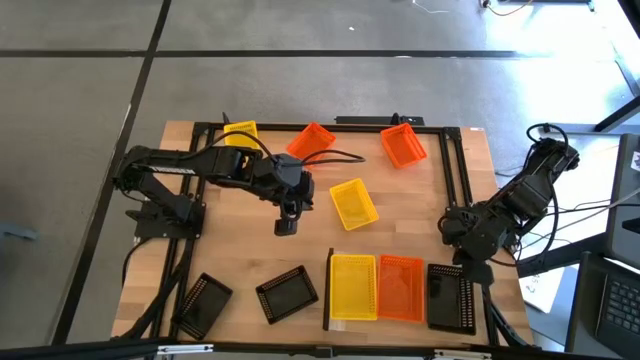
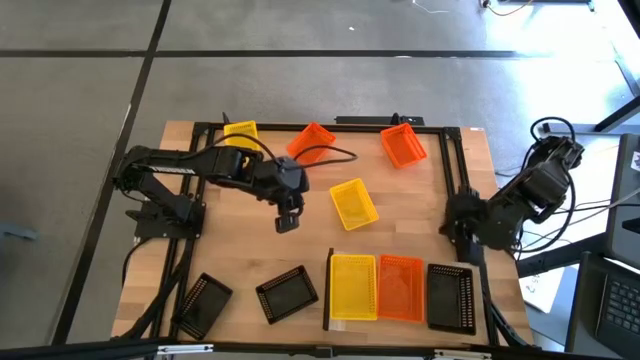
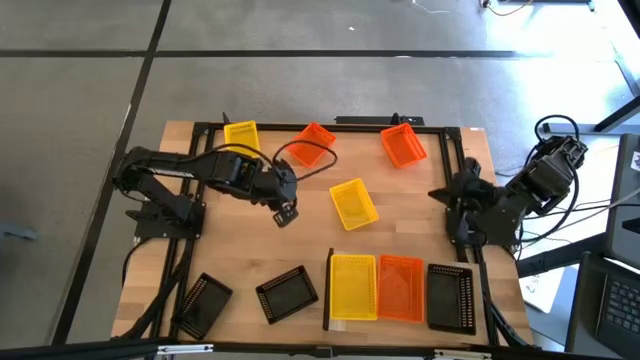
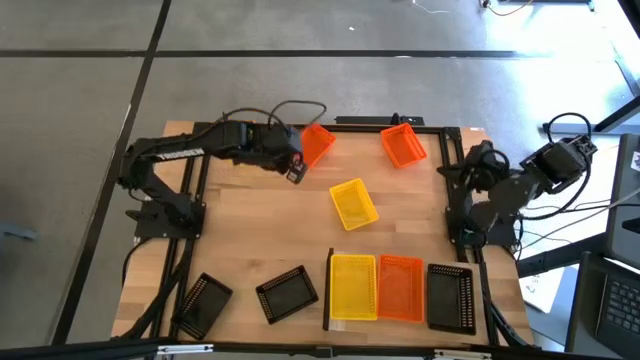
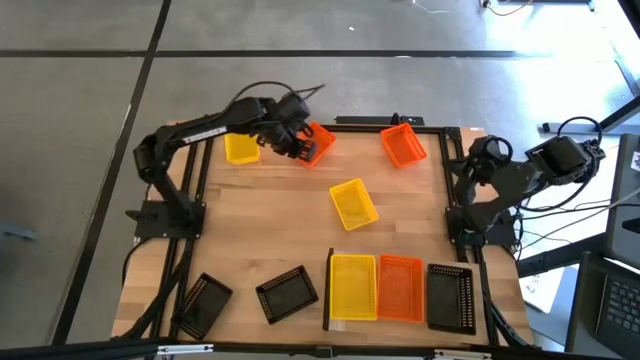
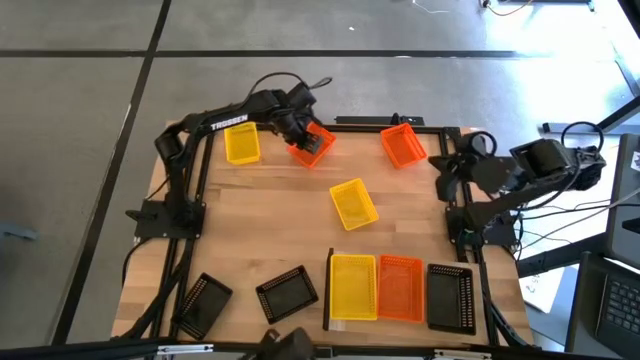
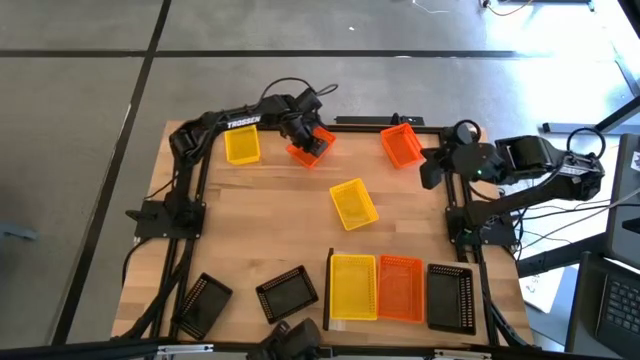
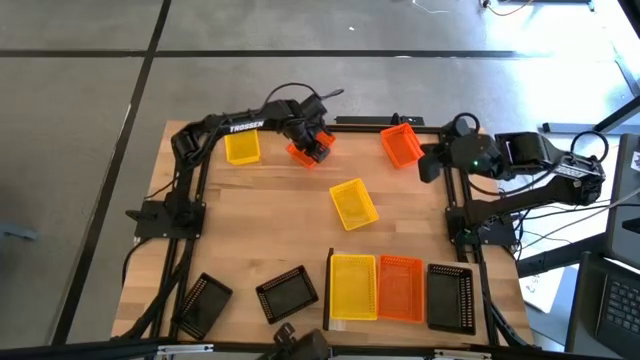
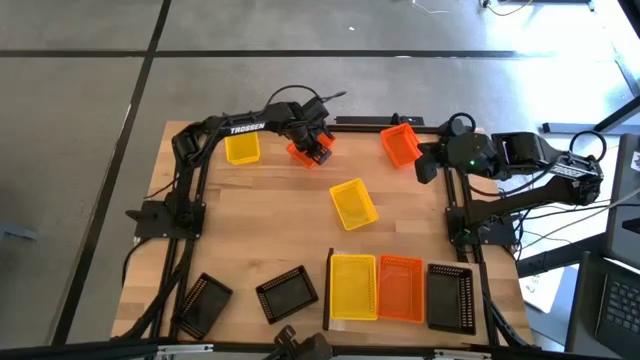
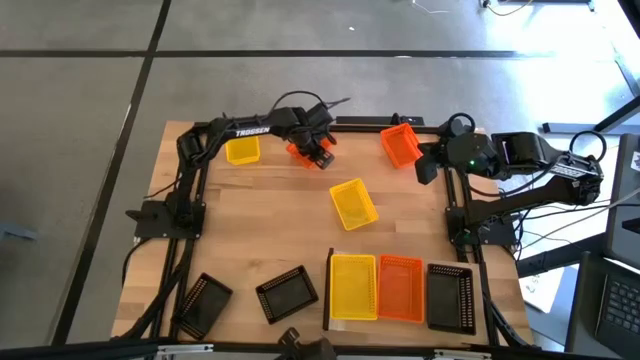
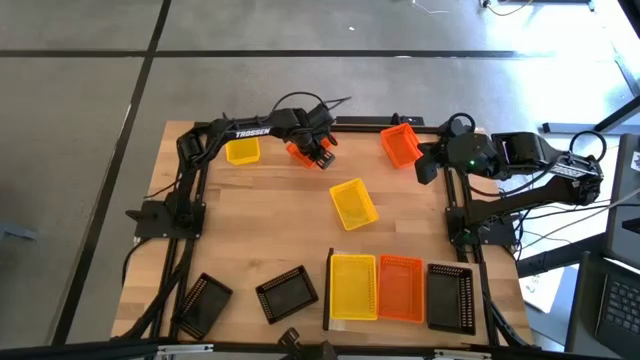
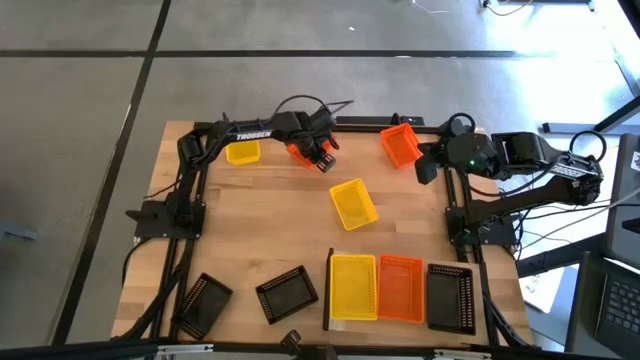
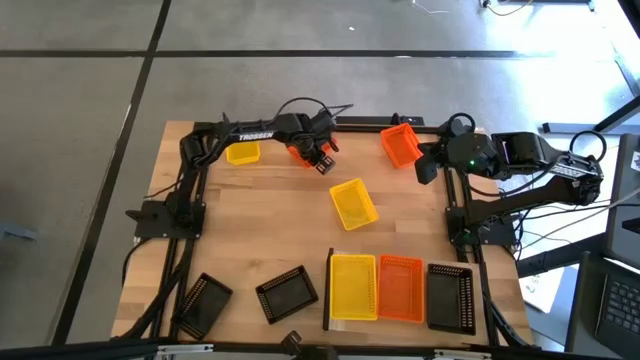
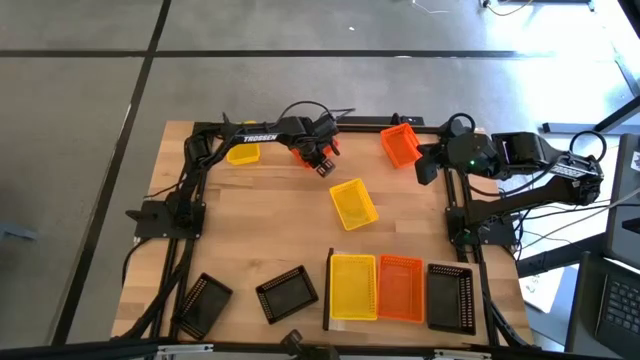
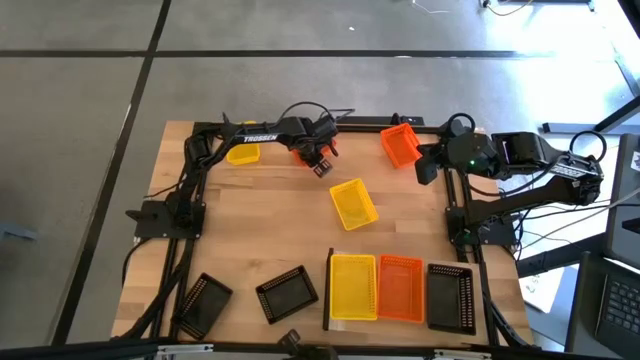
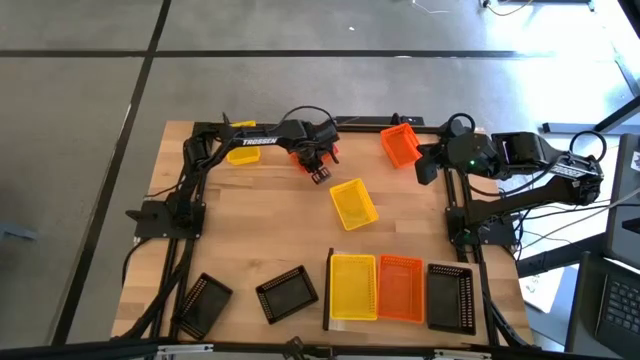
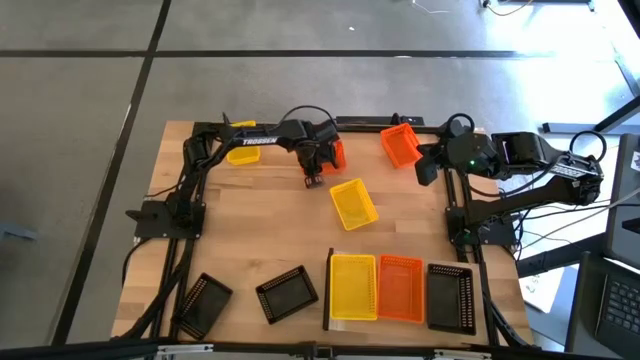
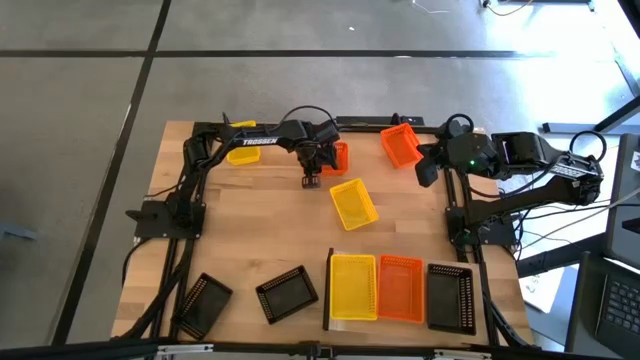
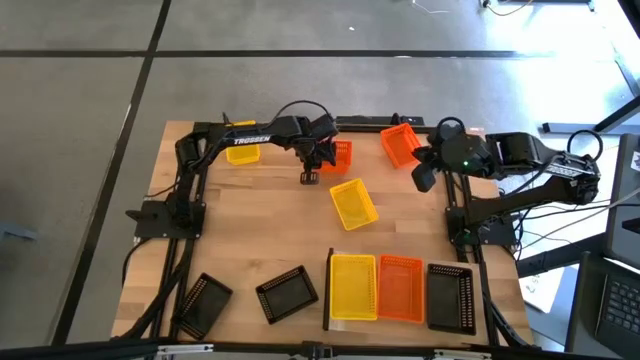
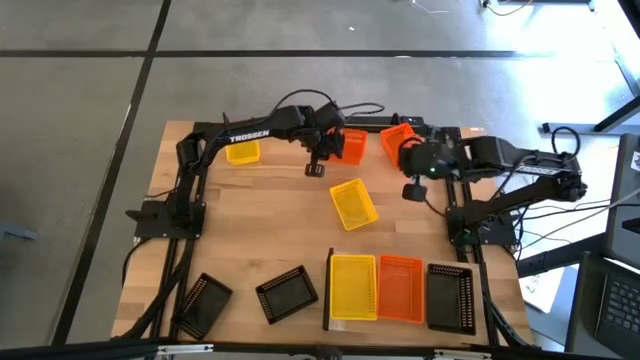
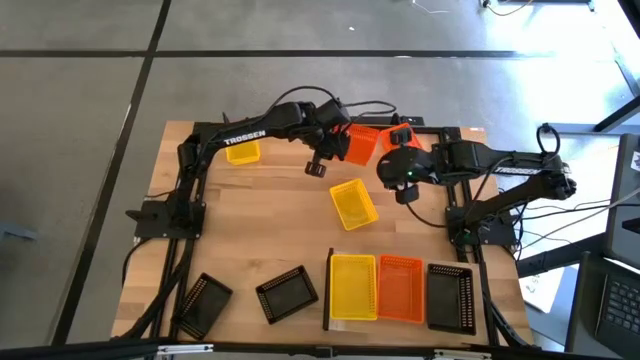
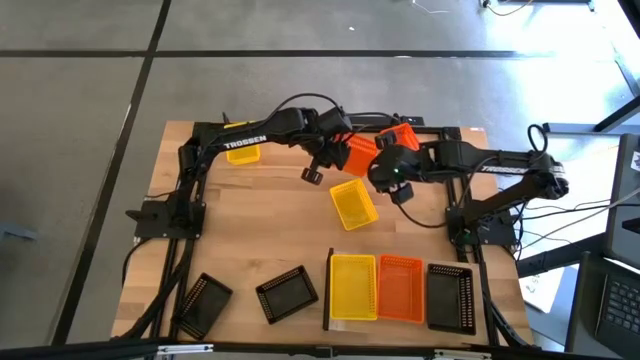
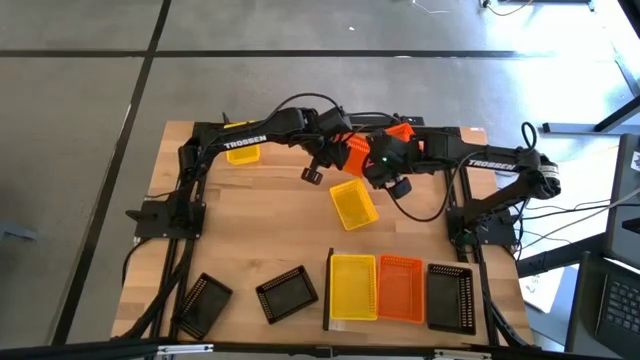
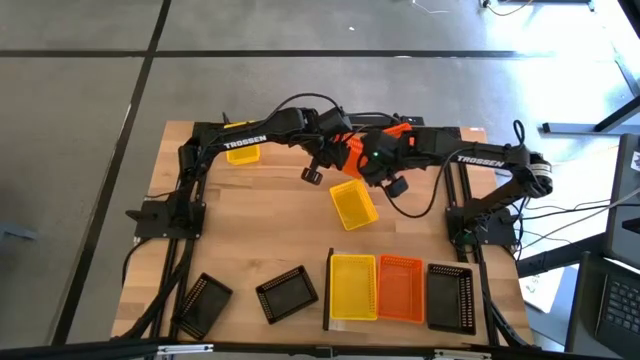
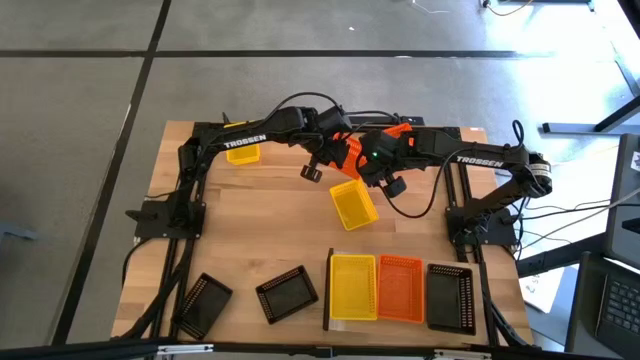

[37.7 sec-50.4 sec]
Task: Stack baskets on shelf by color
Stack the left orange bin on top of the orange bin

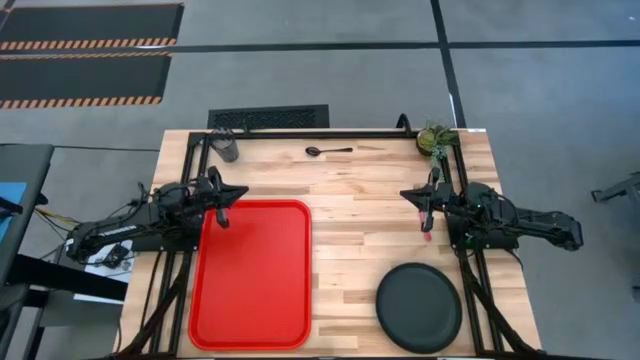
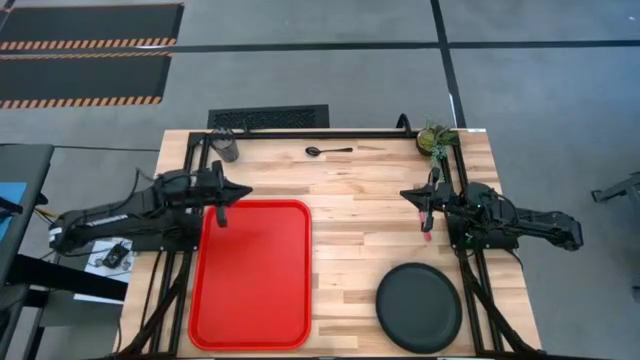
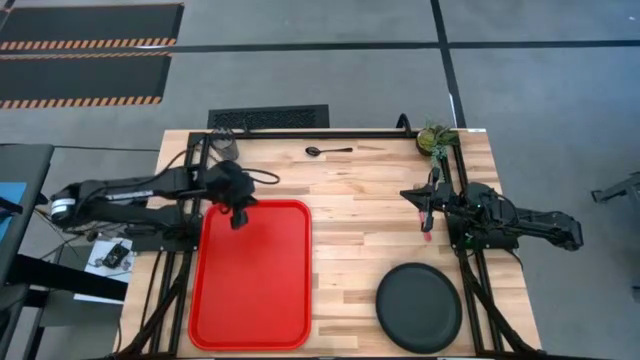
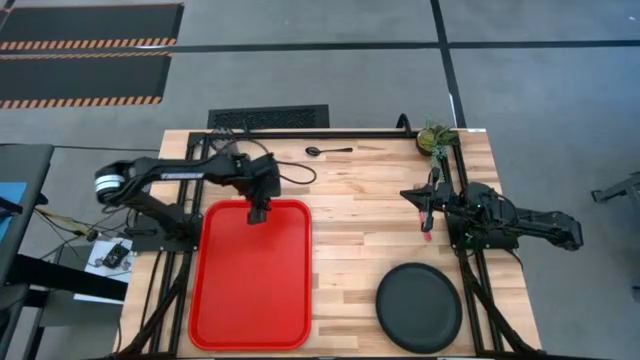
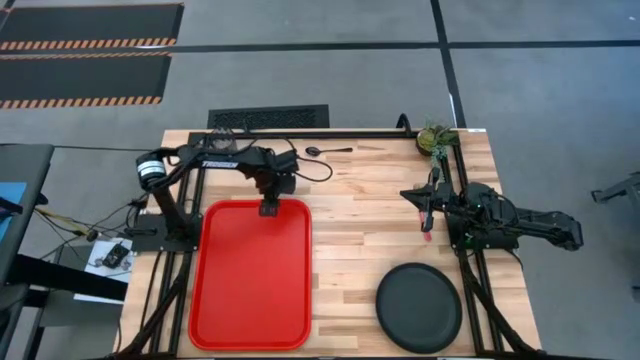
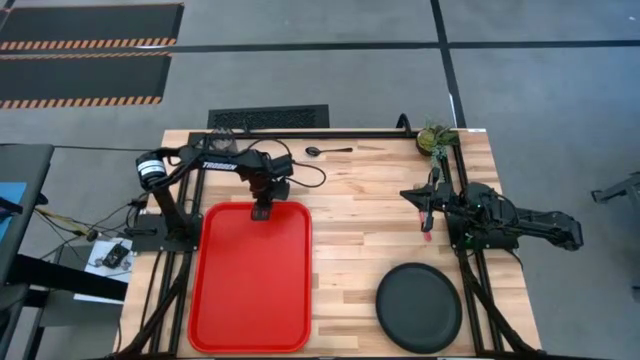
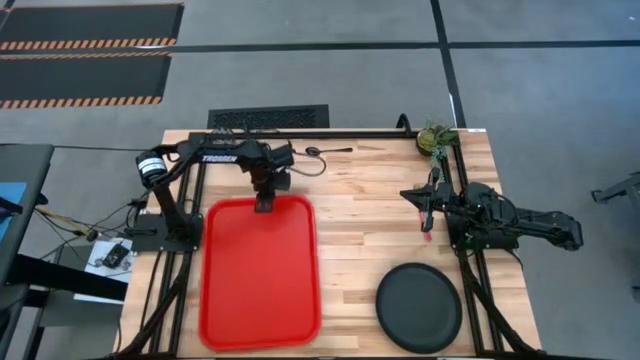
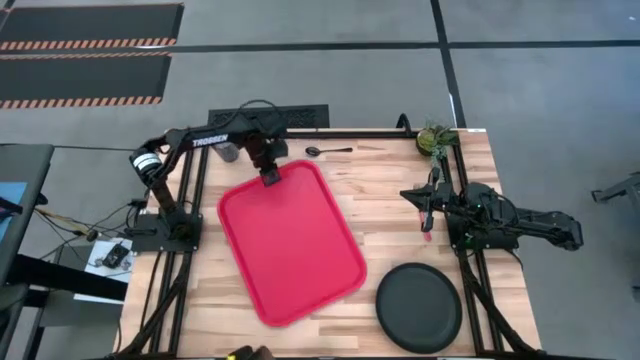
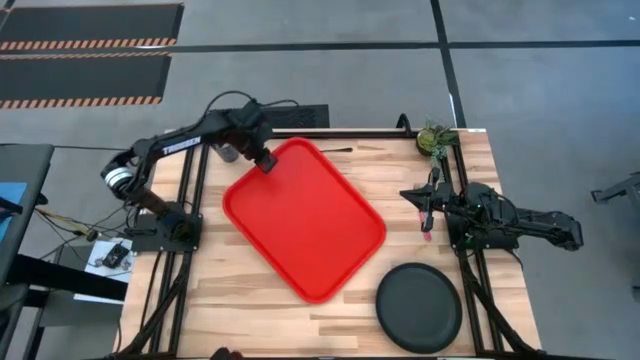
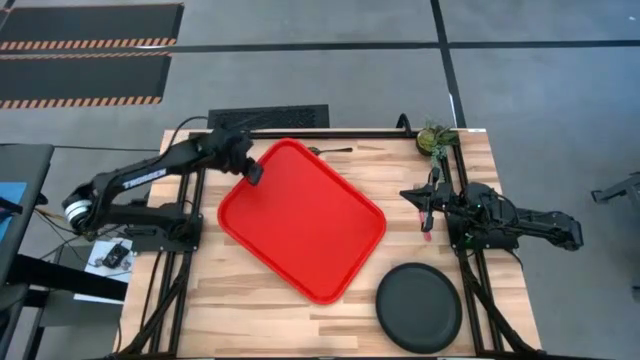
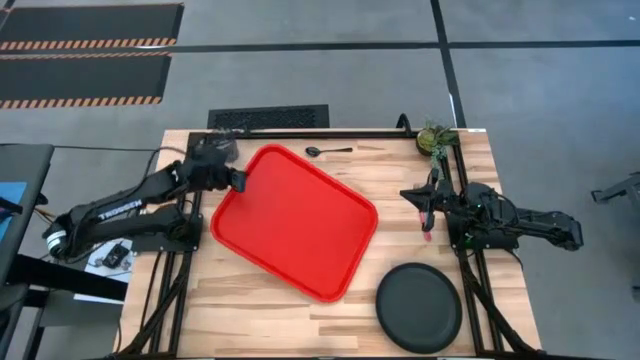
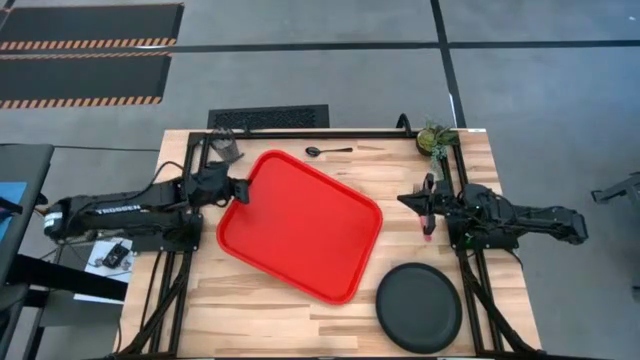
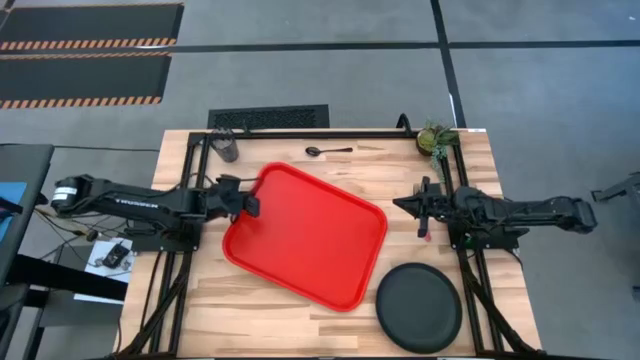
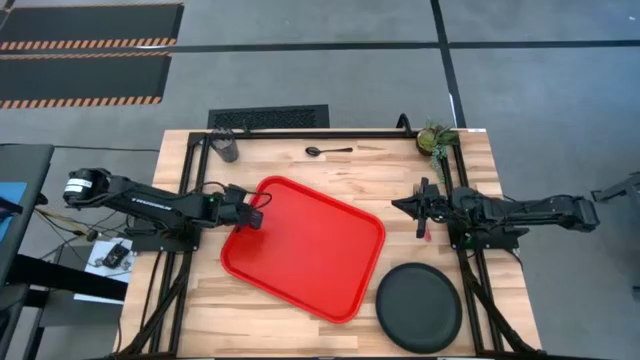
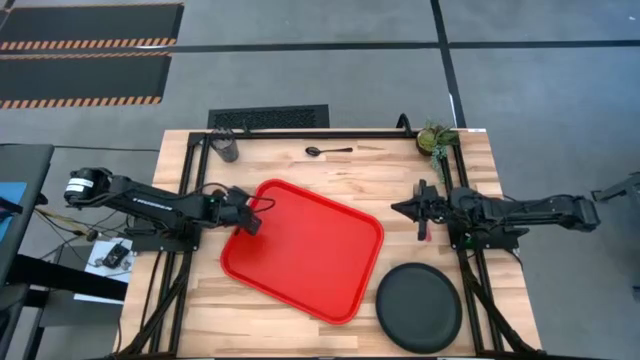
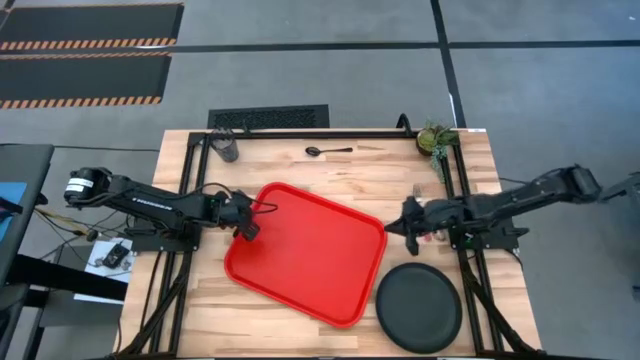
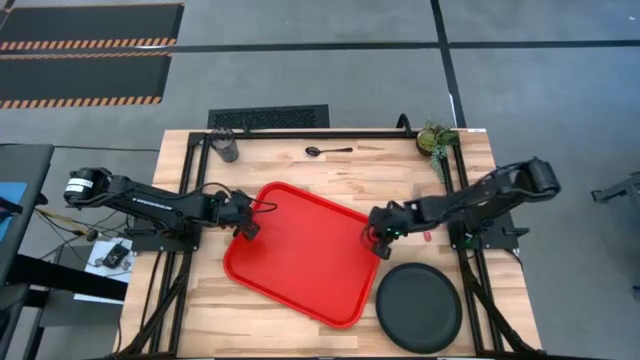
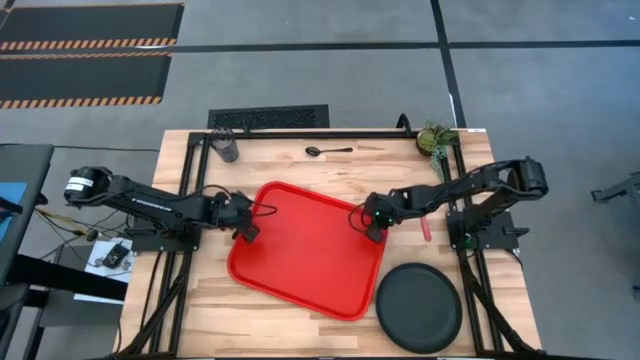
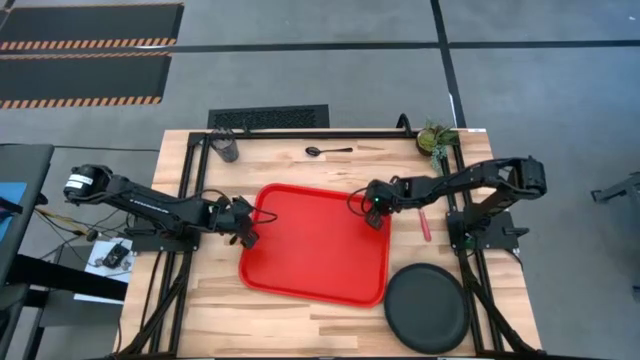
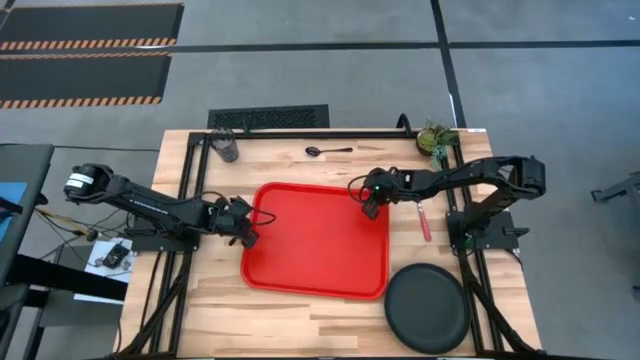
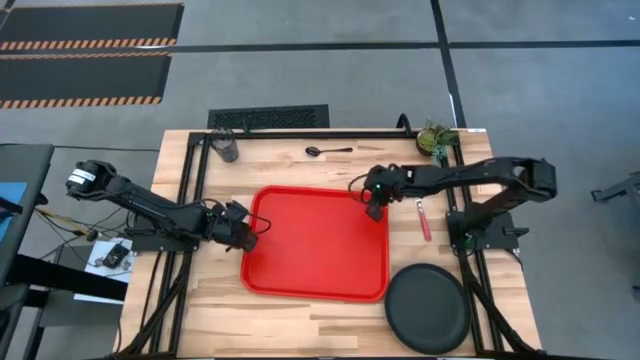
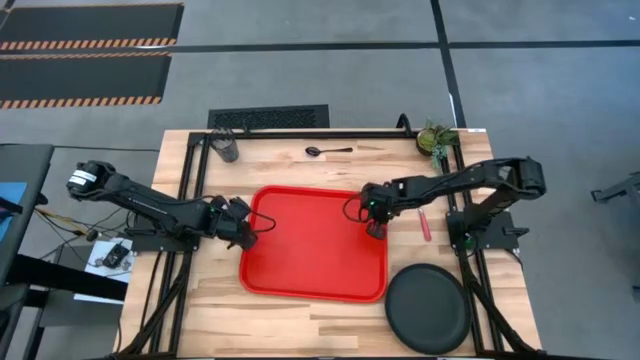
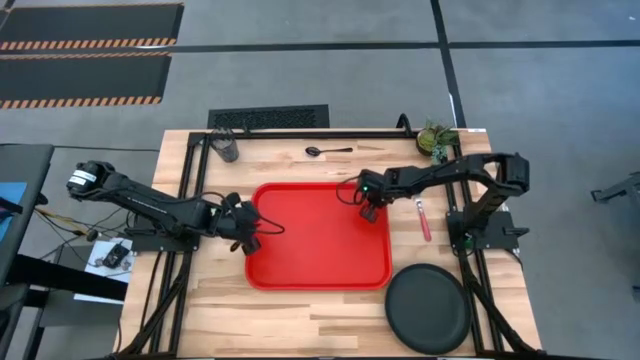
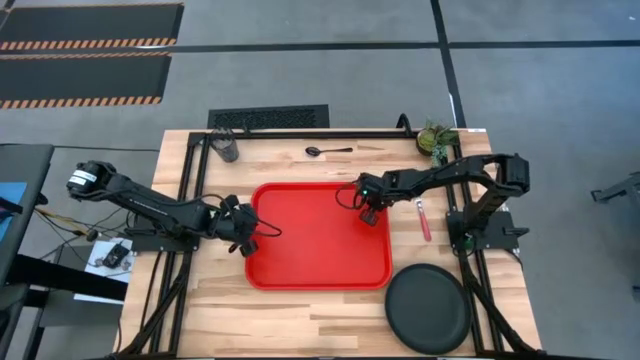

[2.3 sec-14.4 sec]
Task: Pick and place plate/cup/fork/spoon on tray
Prepare the red tray
